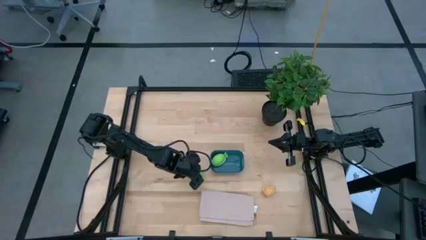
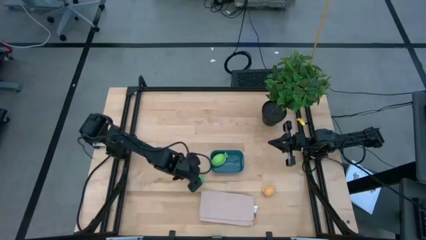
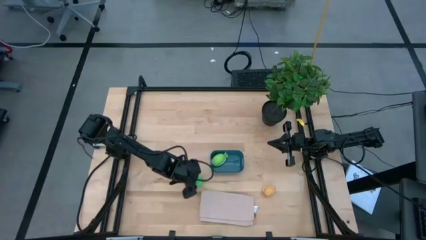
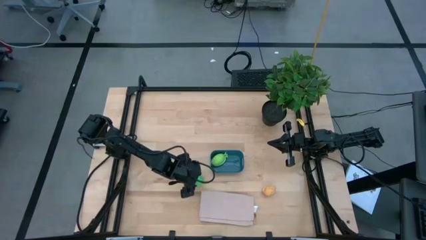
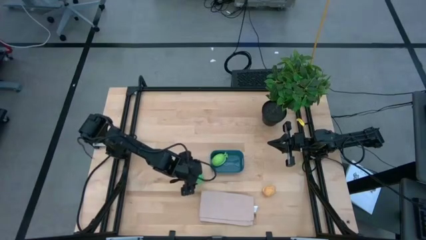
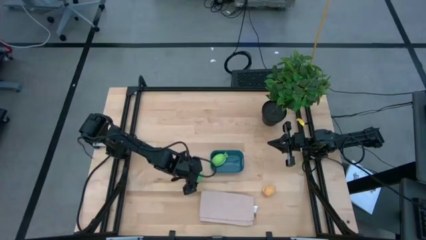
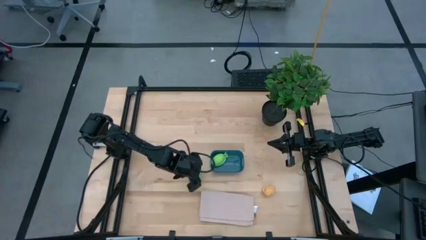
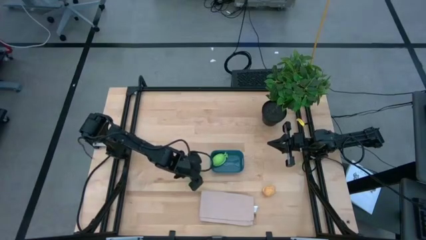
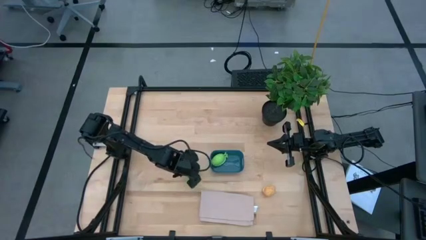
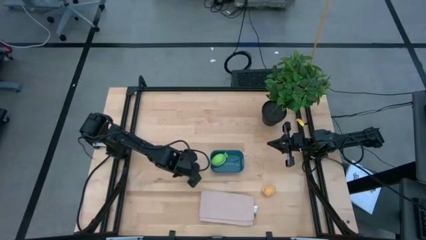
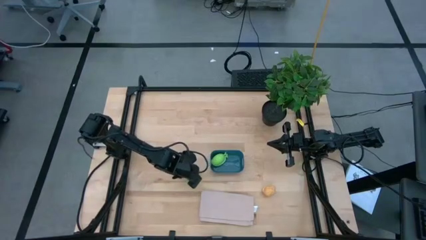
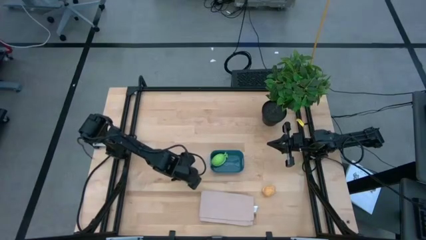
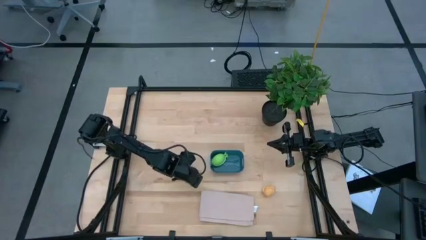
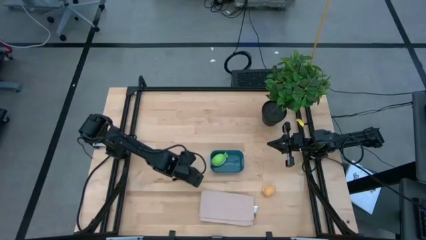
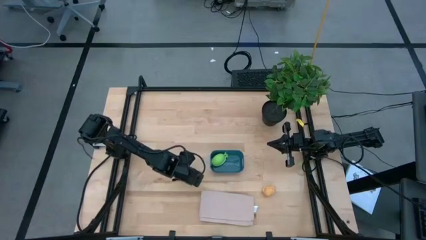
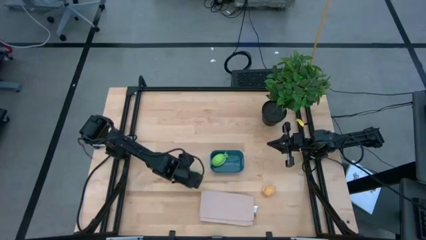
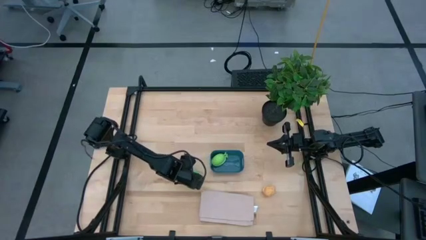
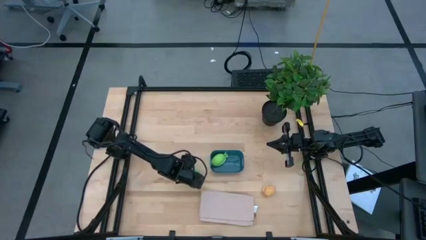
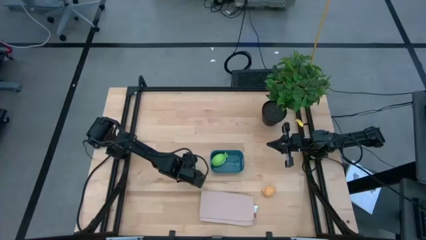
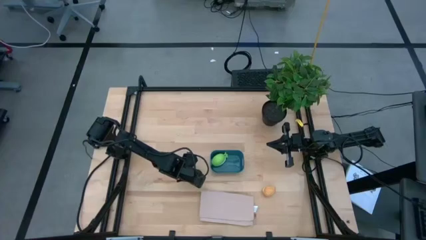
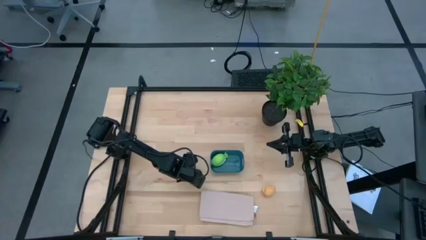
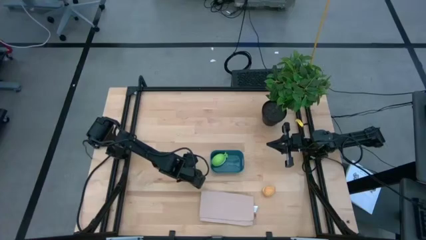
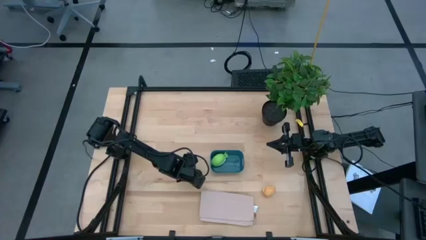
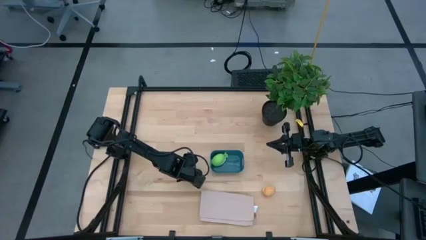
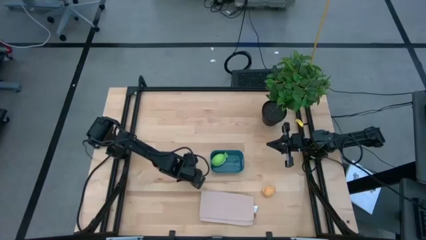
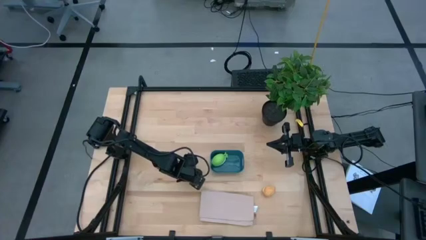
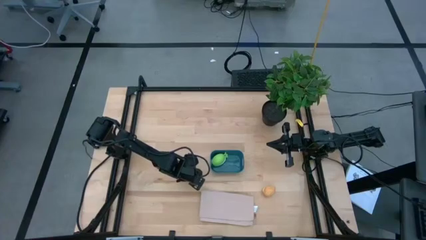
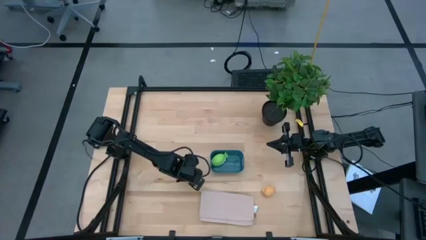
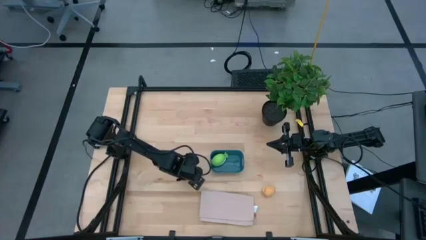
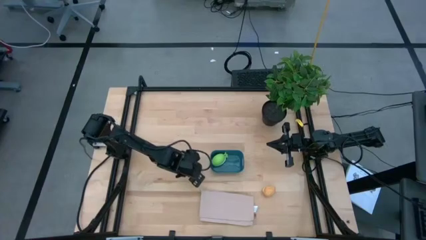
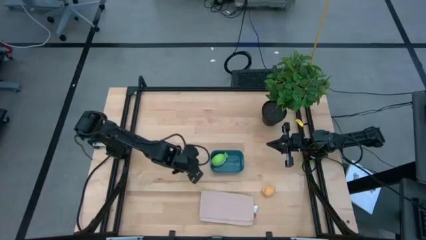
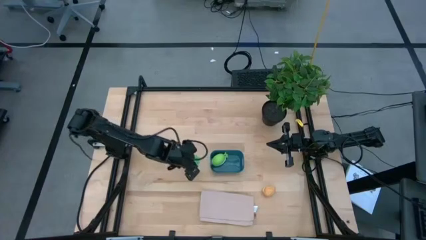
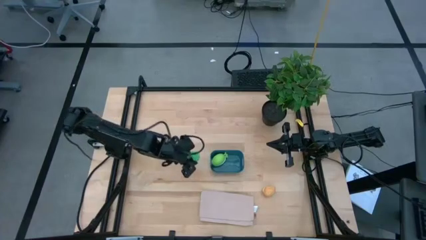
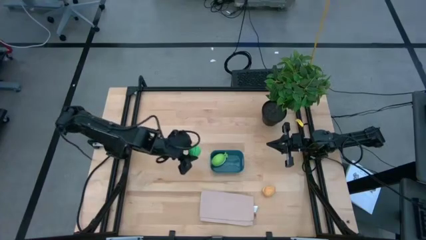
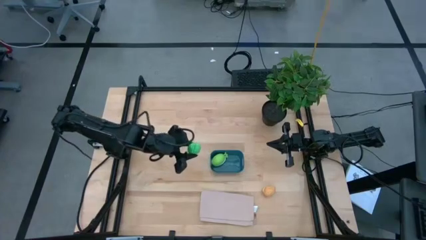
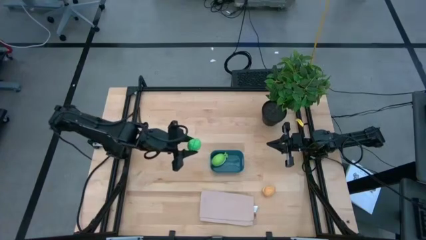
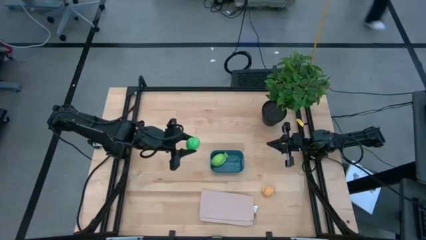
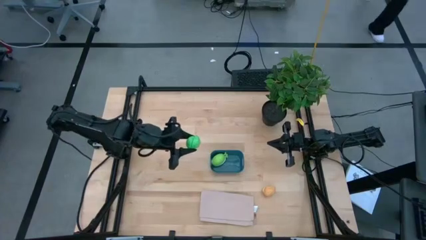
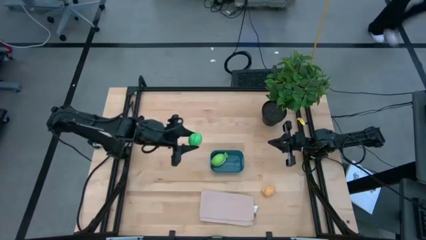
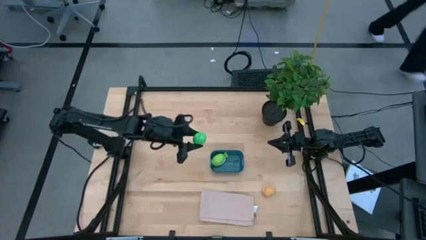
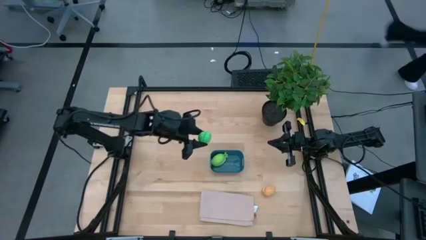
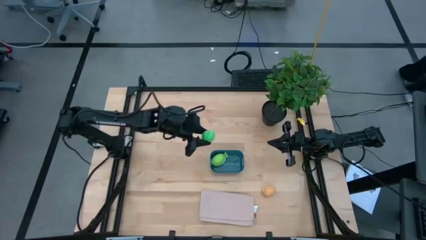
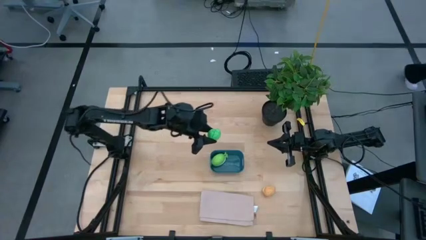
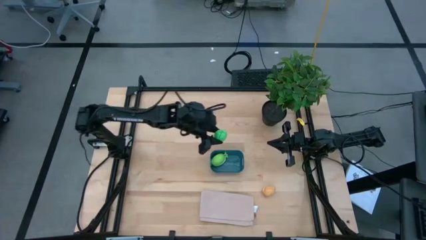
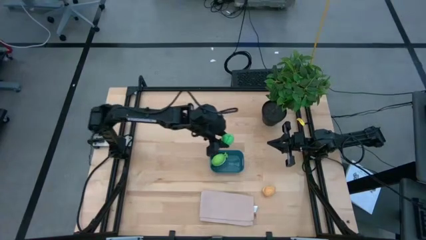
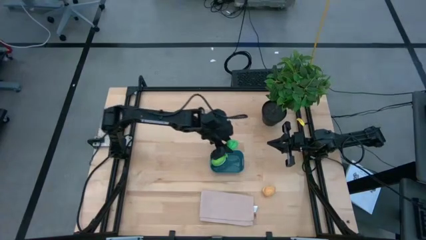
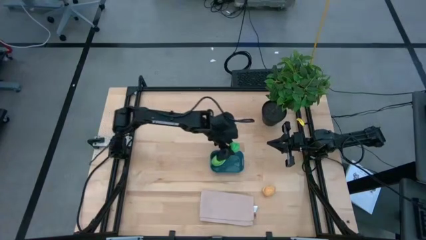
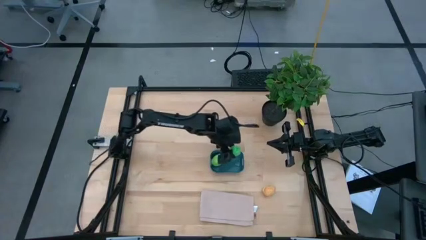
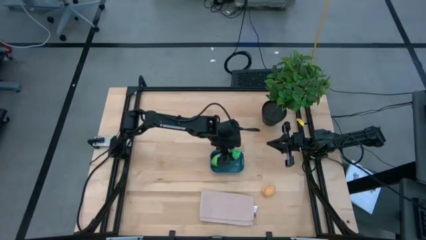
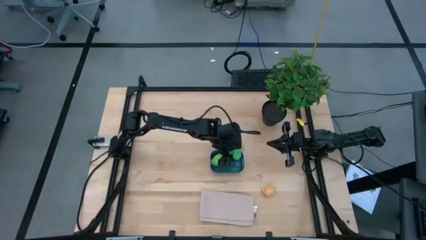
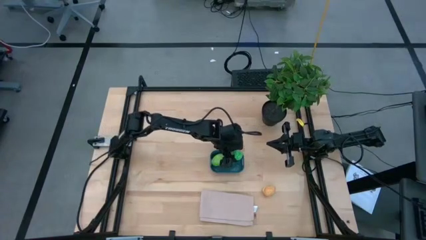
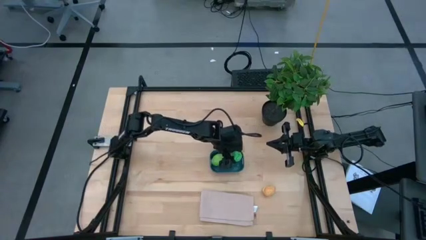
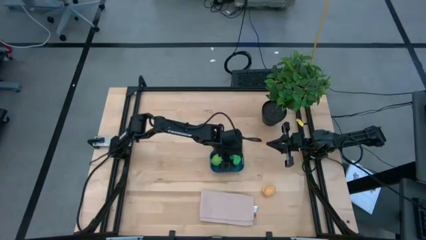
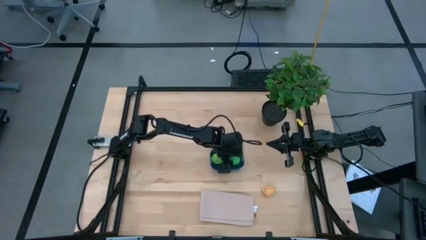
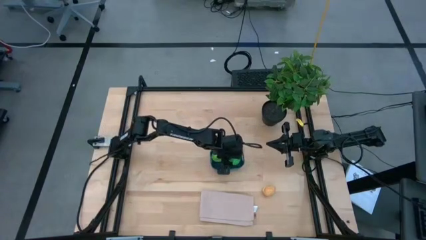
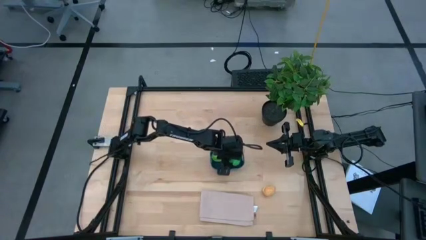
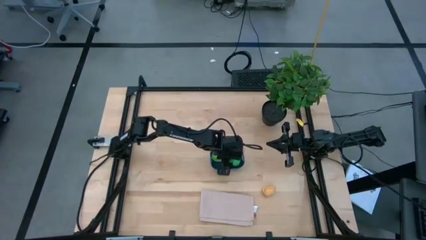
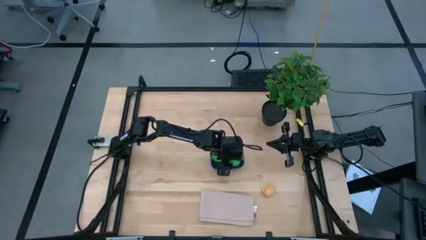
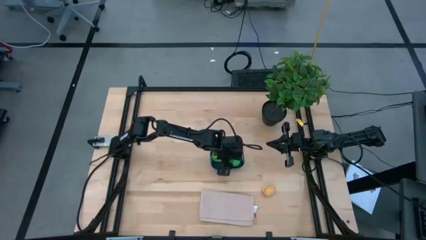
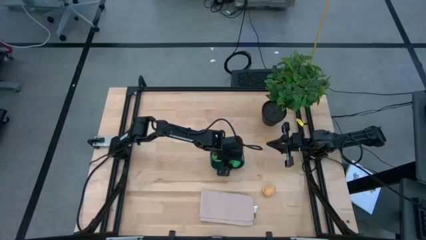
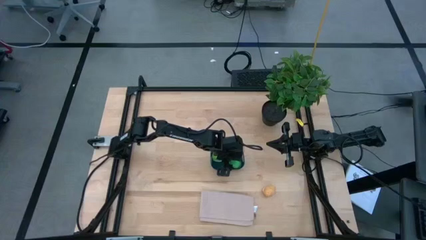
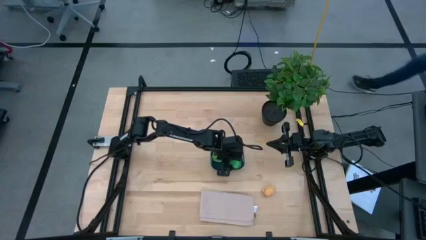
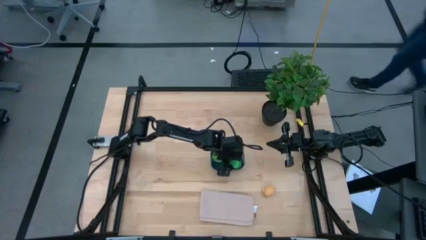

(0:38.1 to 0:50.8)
Task: Pick and placing Produce into tupperware
Put the green pear into the blue bin

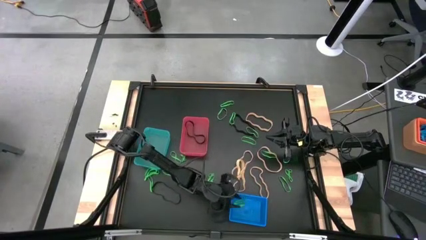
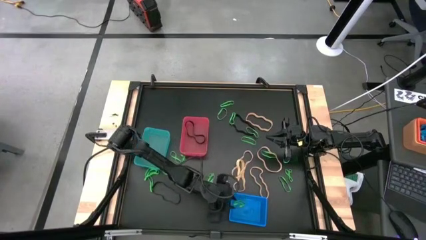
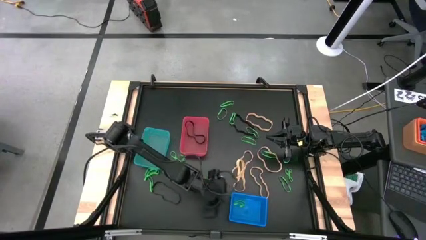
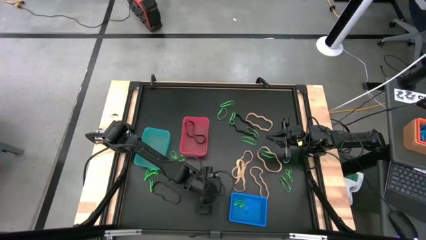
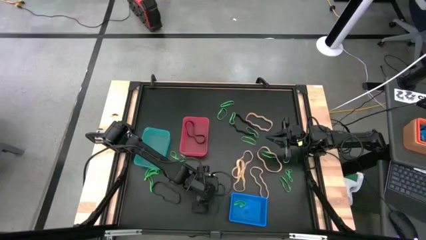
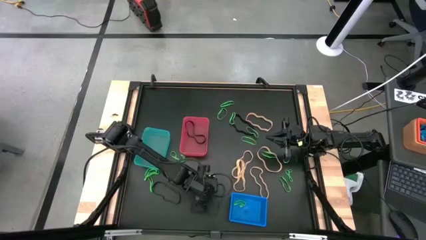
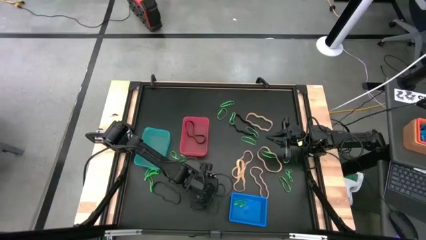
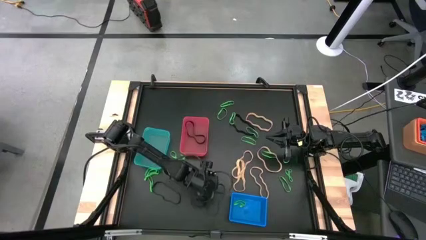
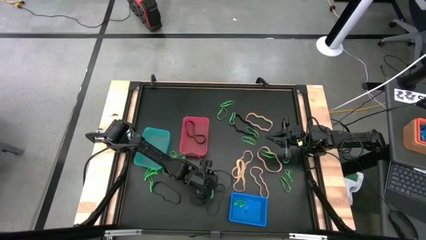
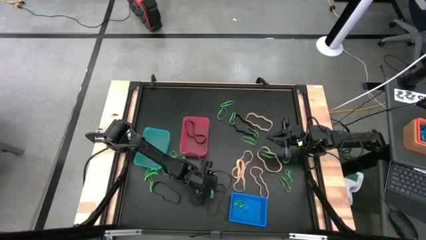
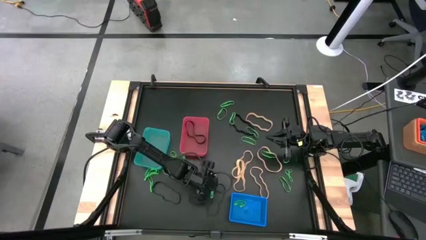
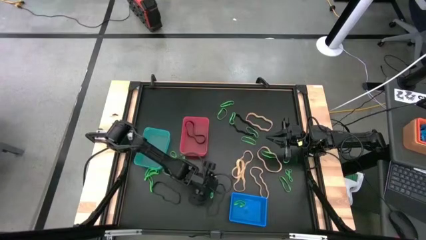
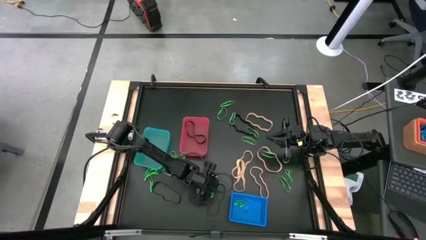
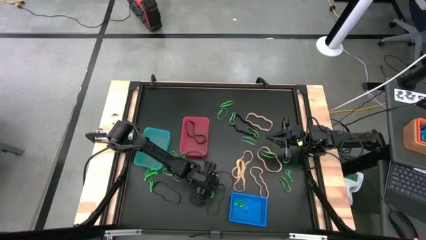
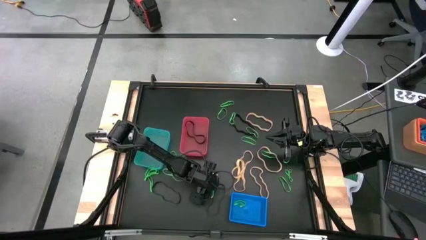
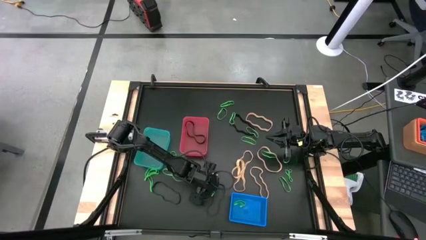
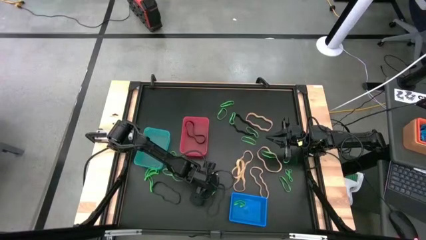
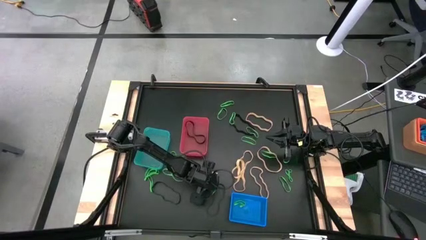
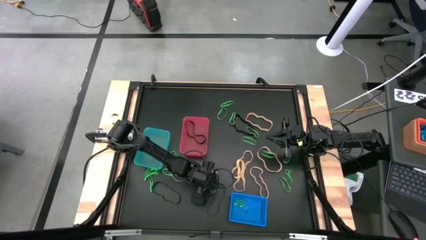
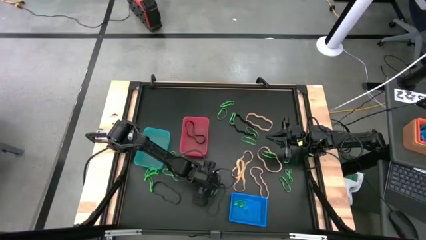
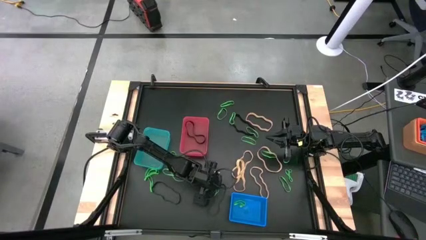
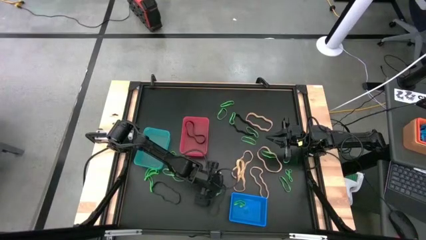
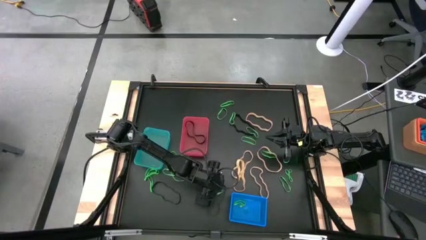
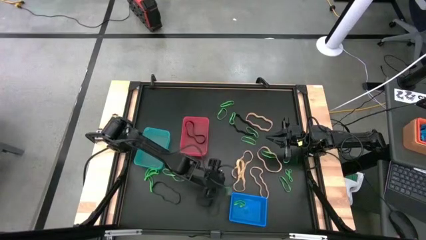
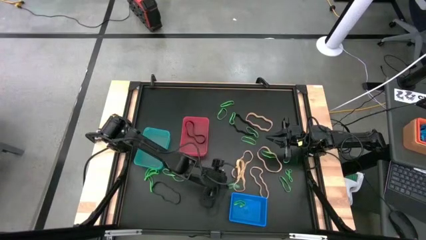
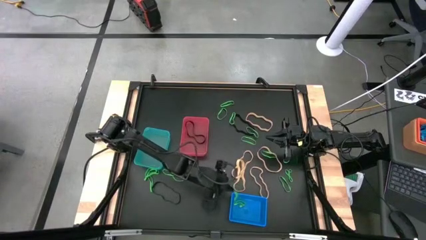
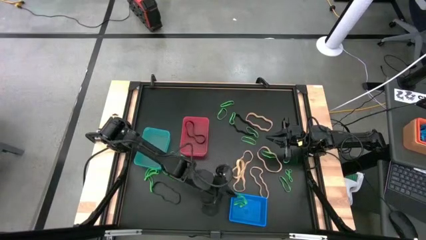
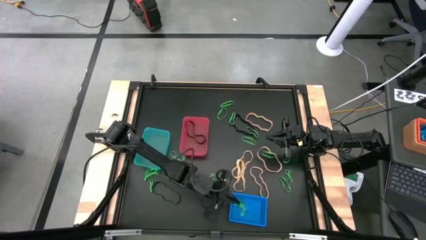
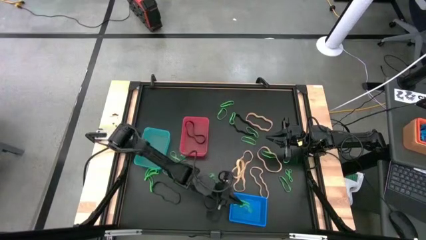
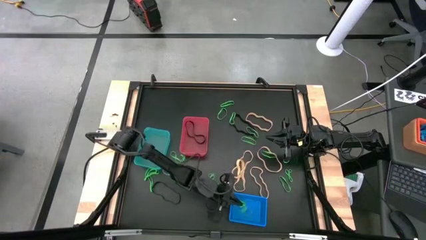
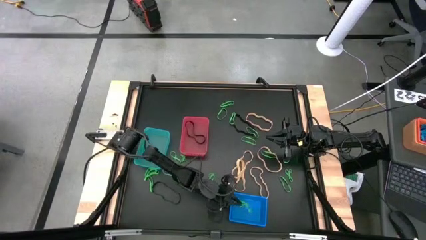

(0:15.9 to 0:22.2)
Task: Sort rubber bands into baskets
Put the green rubber band into the blue bin
